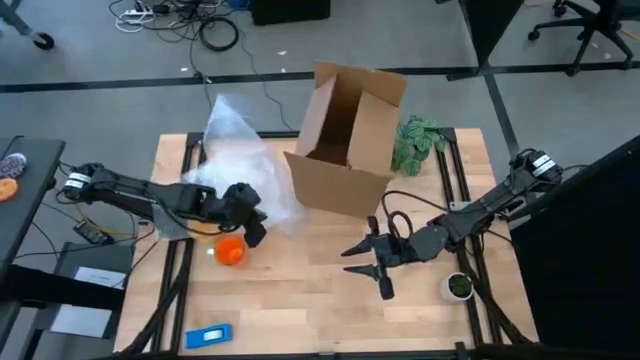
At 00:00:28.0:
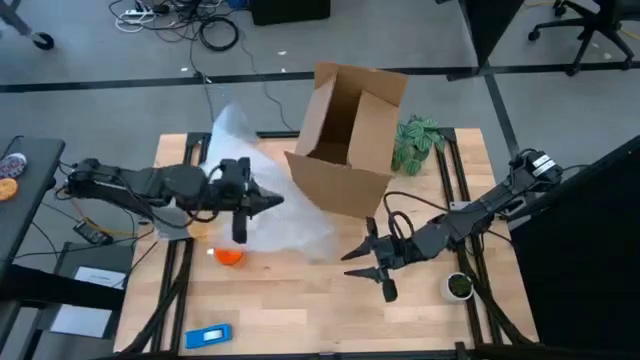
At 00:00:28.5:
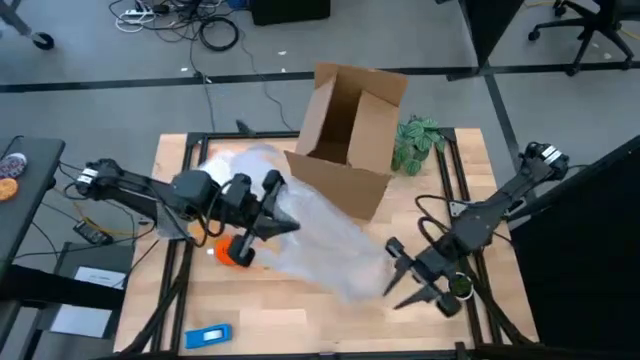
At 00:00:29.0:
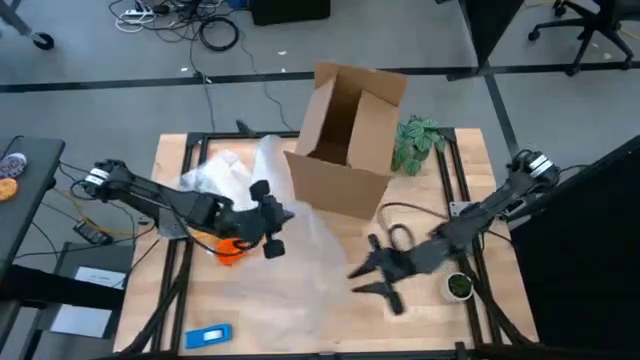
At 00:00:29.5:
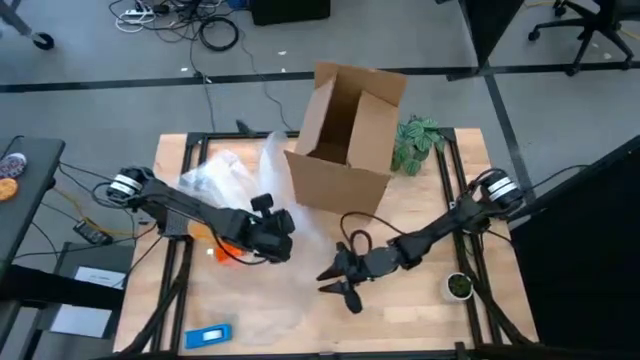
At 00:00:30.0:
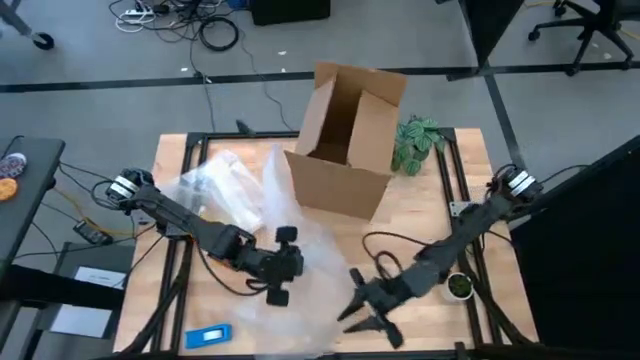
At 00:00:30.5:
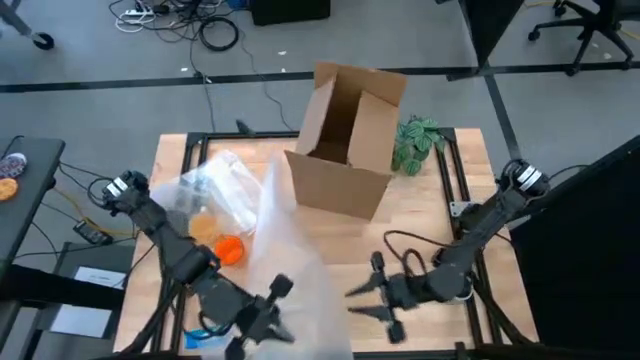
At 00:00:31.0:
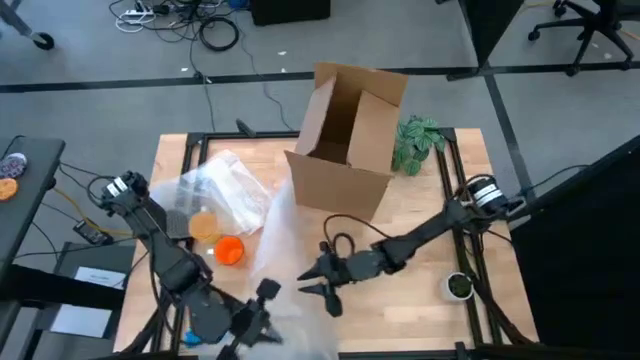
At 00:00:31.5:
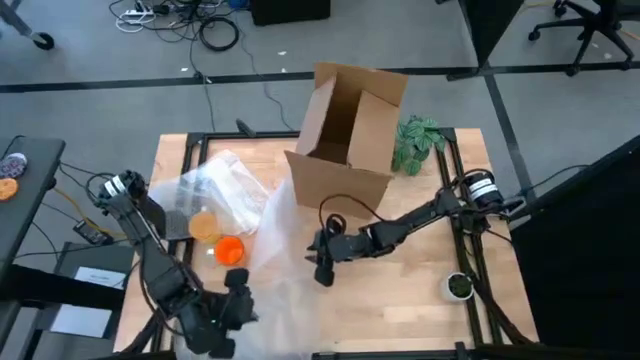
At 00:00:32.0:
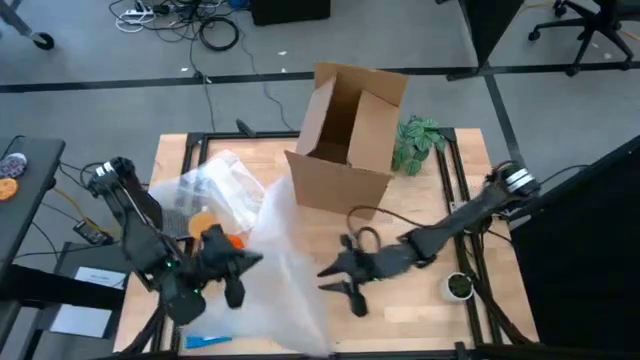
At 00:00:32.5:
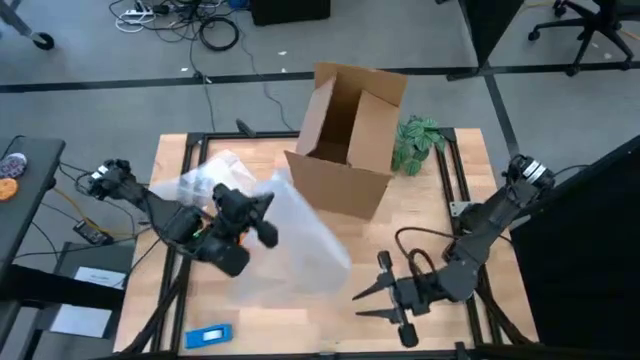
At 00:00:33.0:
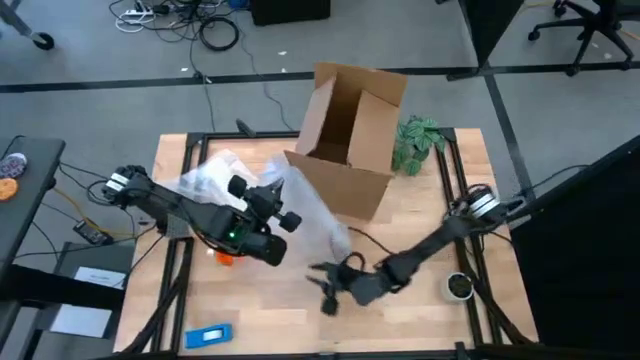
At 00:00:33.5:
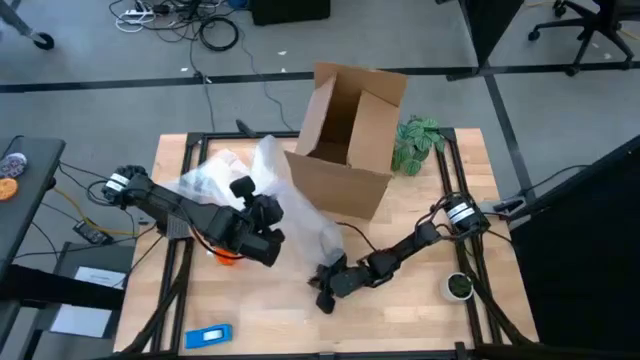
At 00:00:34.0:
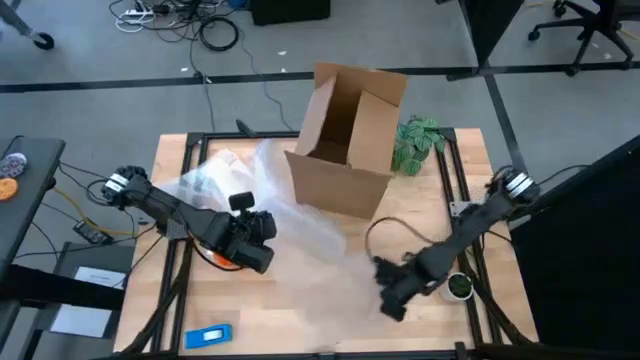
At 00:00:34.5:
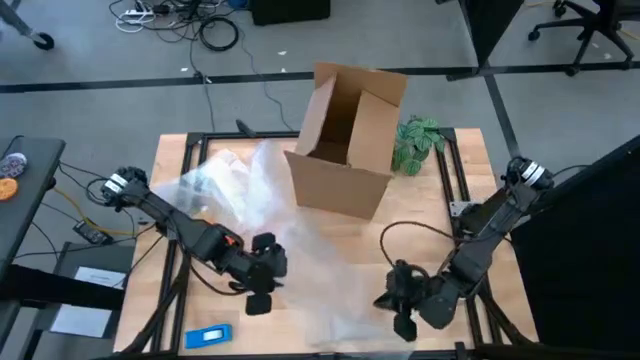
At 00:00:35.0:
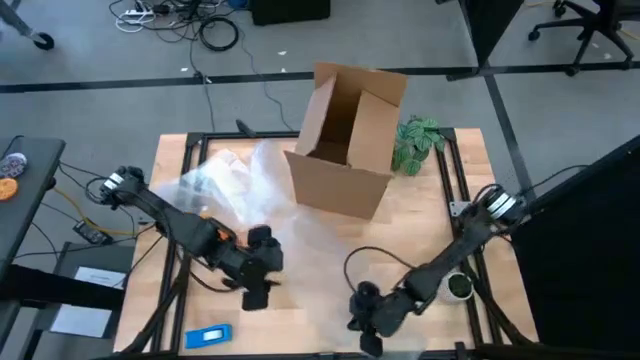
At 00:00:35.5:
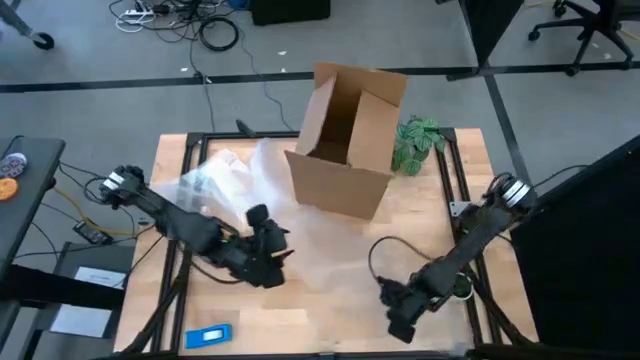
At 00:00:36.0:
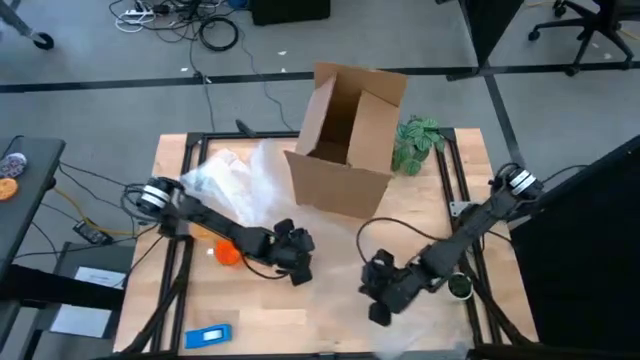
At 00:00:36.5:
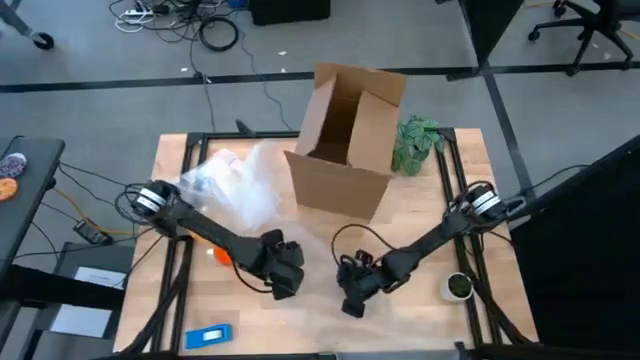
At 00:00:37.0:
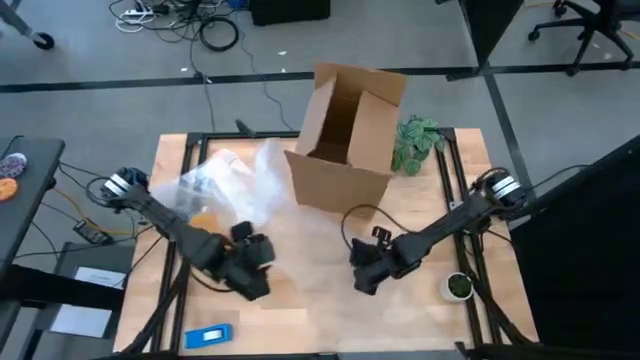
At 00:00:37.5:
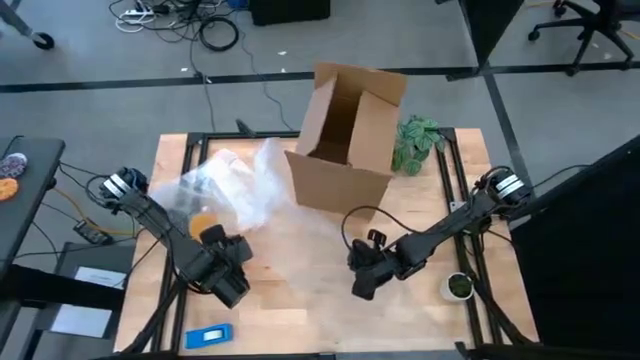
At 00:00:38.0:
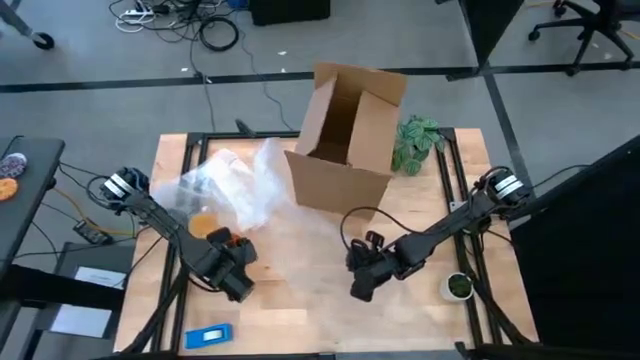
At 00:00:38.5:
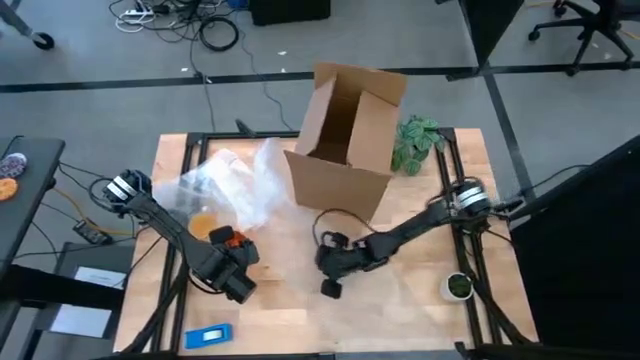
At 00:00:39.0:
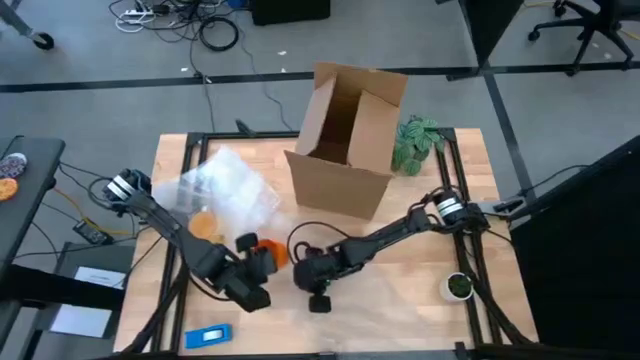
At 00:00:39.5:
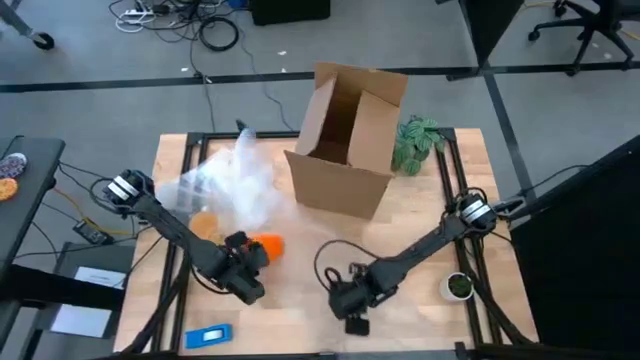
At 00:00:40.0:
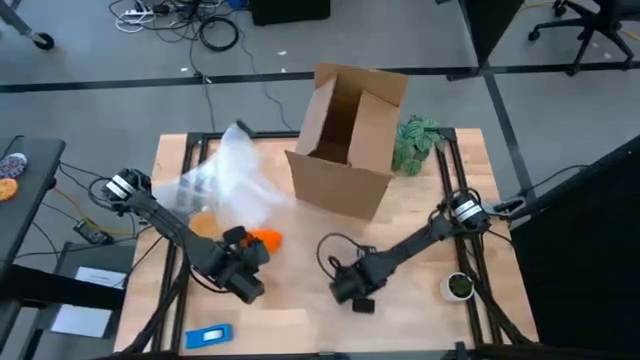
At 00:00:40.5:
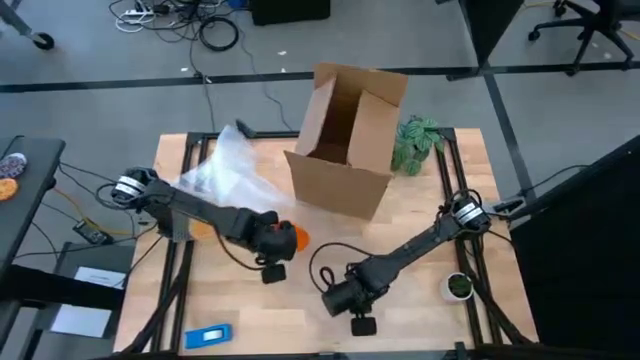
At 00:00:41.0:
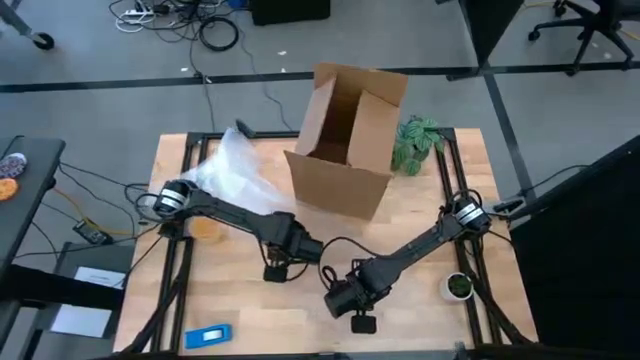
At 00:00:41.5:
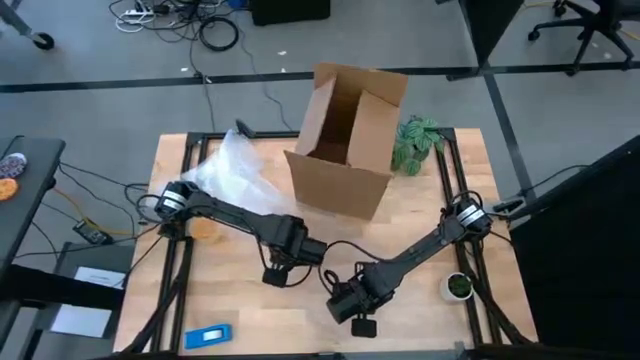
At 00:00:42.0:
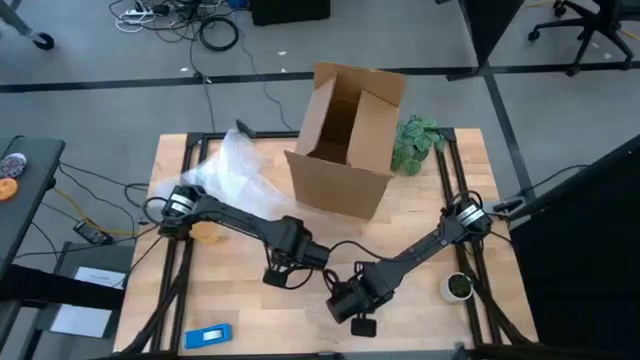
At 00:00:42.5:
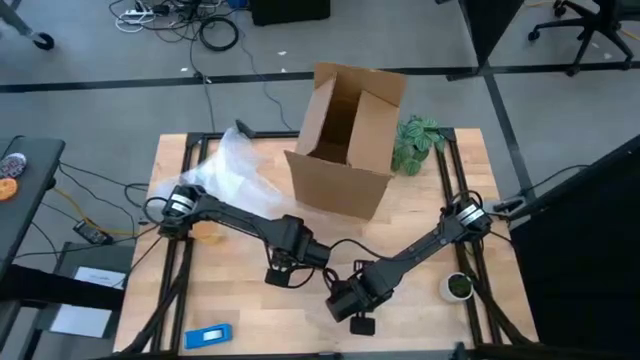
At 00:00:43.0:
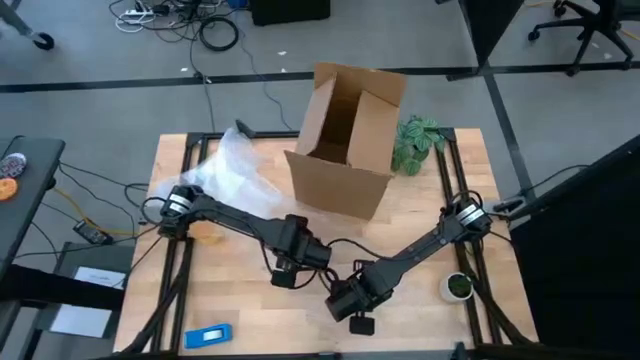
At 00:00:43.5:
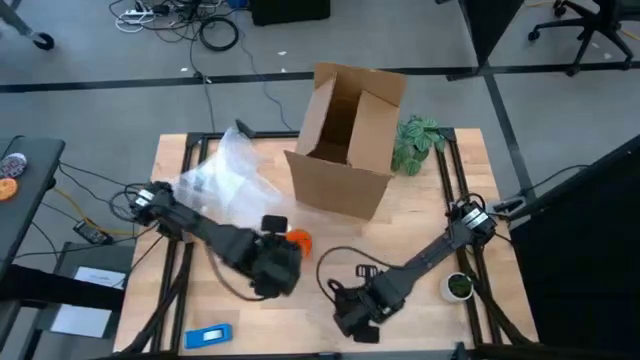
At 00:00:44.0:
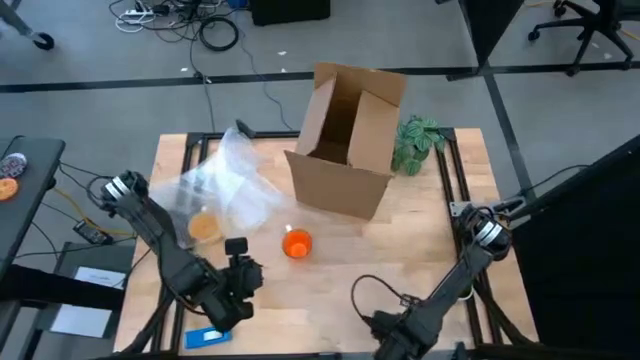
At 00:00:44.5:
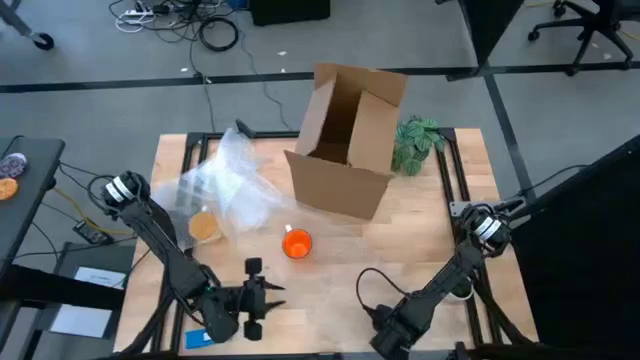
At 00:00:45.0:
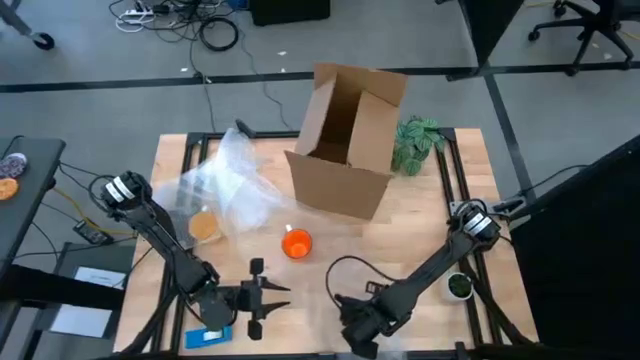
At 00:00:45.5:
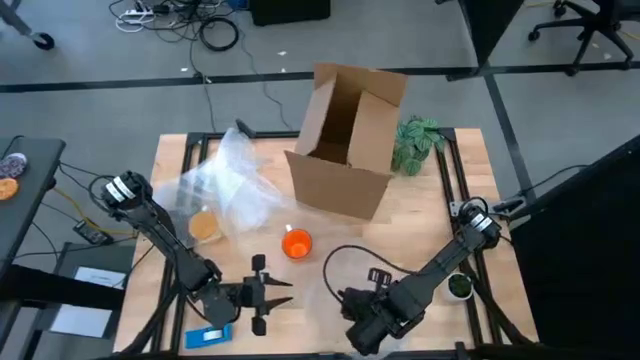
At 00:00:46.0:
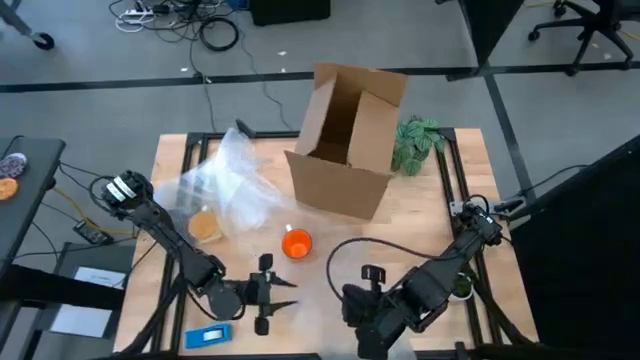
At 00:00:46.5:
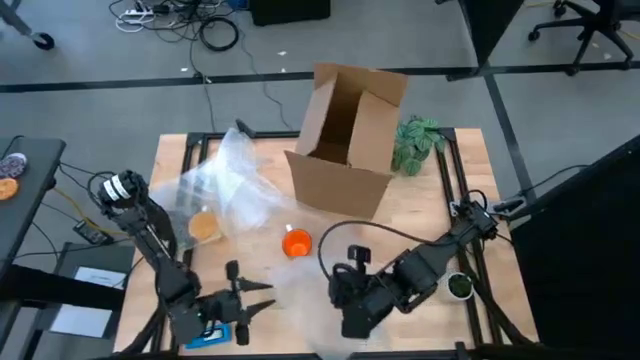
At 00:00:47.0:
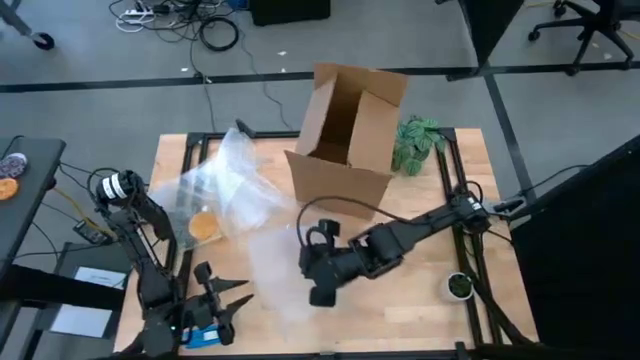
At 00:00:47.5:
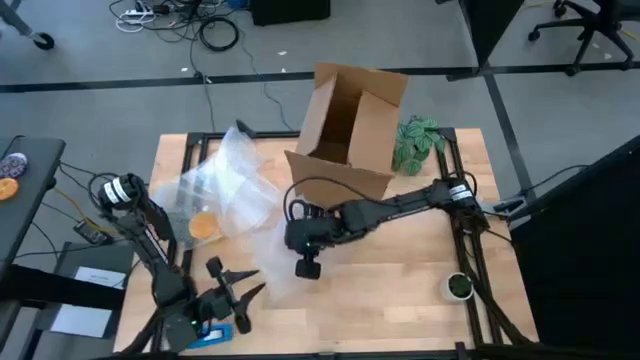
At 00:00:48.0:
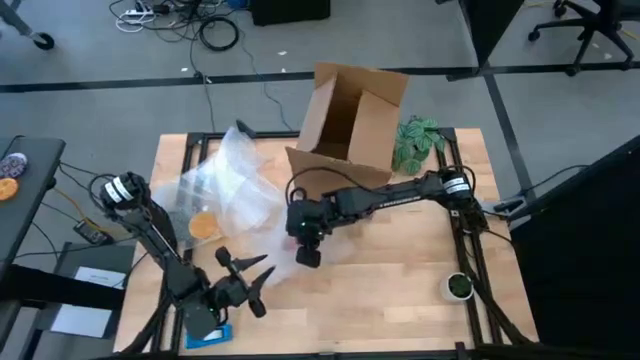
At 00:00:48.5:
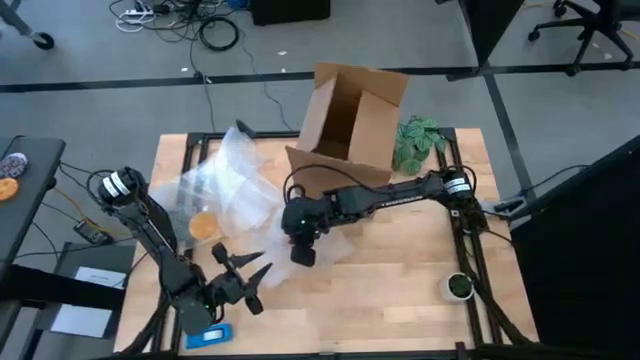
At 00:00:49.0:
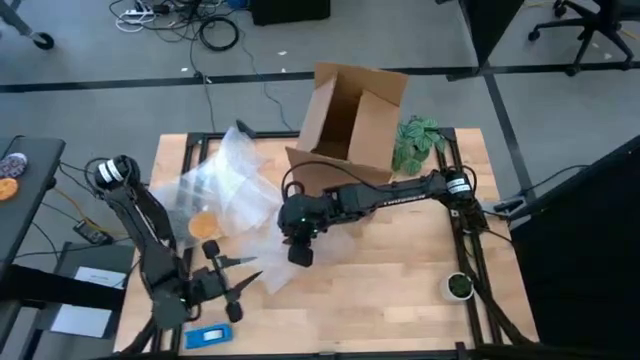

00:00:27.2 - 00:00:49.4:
Task: wrap mug
Wrap the orange mug with transparent bubble wrap
